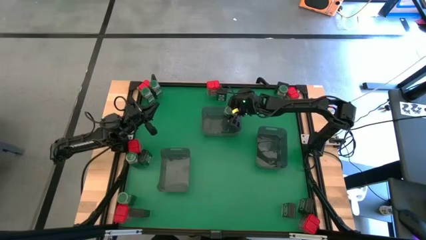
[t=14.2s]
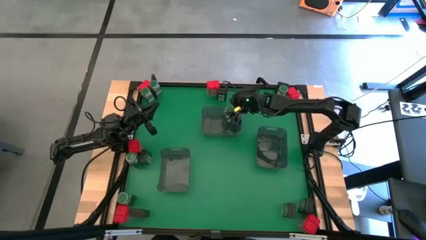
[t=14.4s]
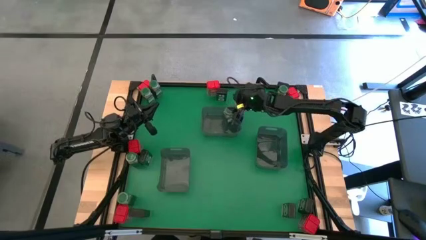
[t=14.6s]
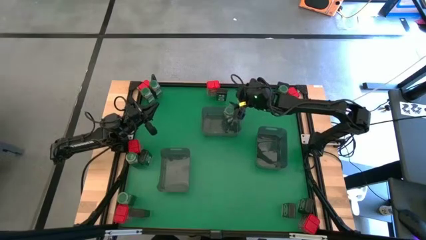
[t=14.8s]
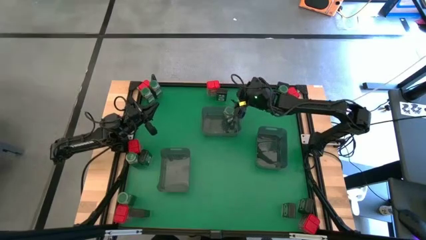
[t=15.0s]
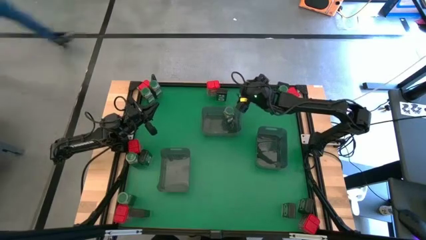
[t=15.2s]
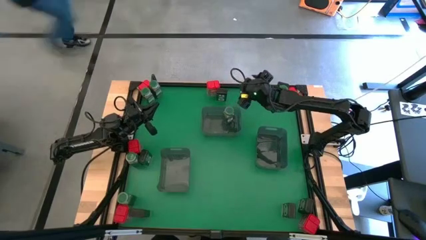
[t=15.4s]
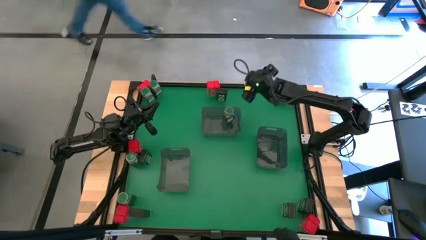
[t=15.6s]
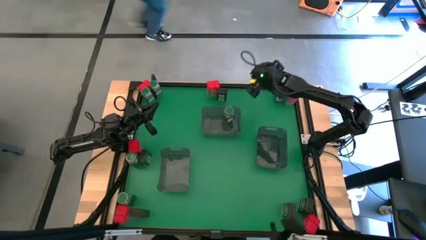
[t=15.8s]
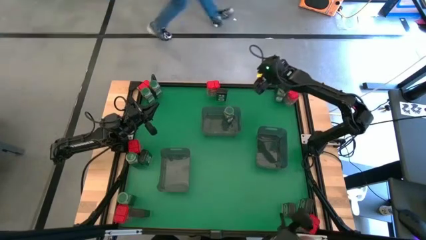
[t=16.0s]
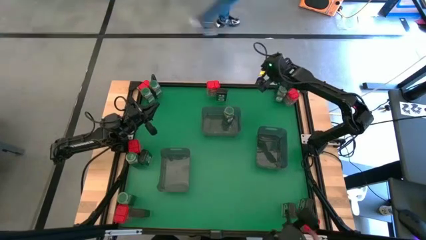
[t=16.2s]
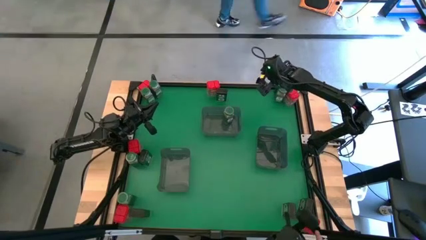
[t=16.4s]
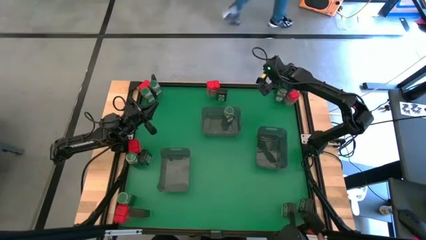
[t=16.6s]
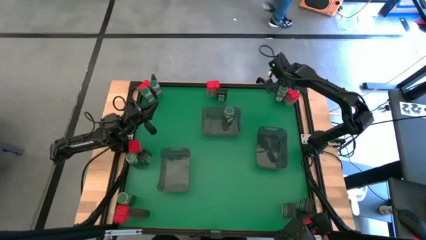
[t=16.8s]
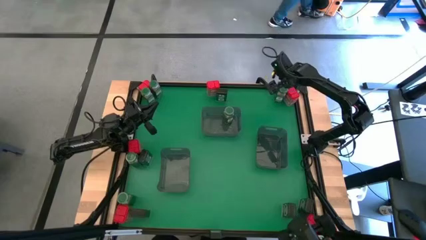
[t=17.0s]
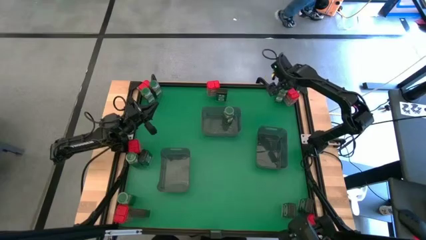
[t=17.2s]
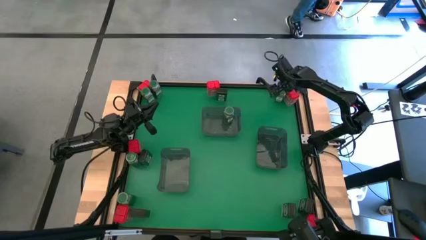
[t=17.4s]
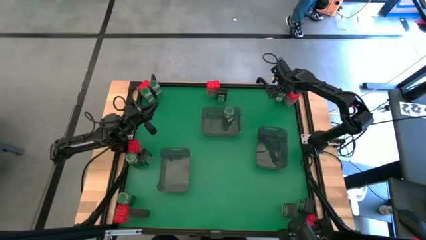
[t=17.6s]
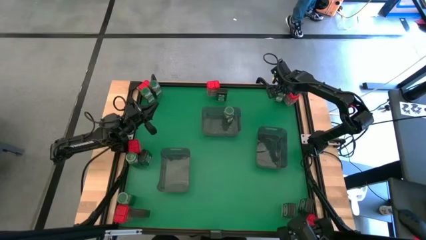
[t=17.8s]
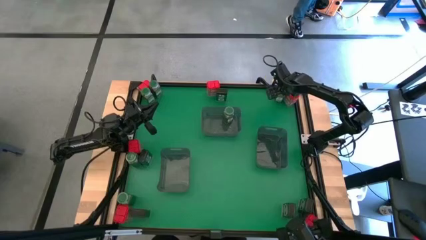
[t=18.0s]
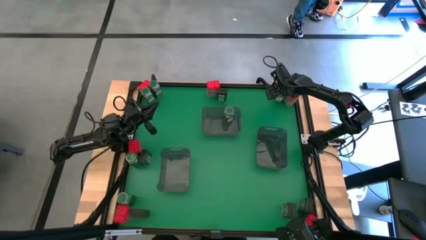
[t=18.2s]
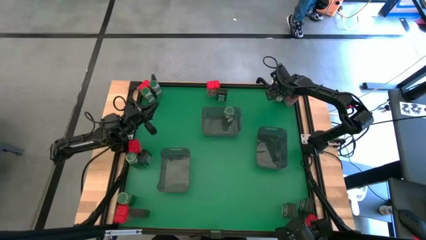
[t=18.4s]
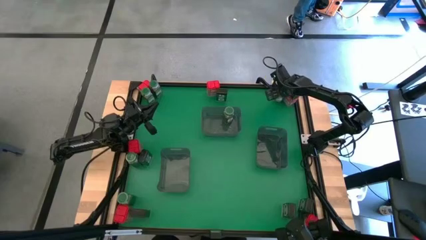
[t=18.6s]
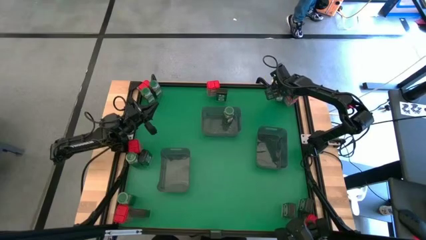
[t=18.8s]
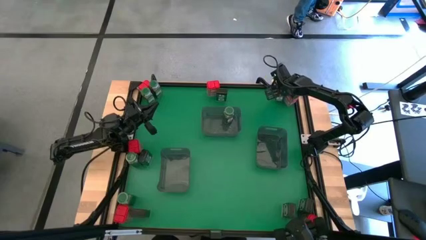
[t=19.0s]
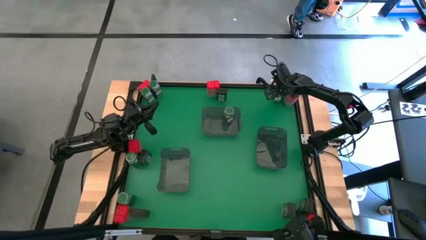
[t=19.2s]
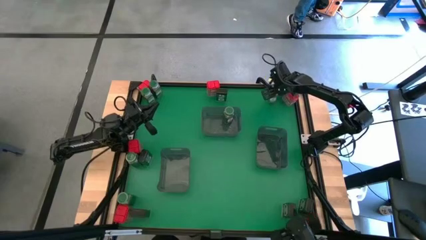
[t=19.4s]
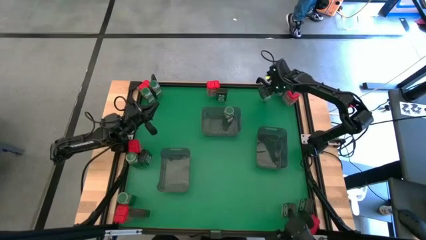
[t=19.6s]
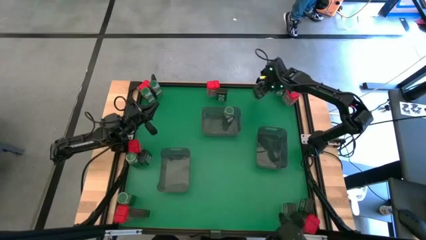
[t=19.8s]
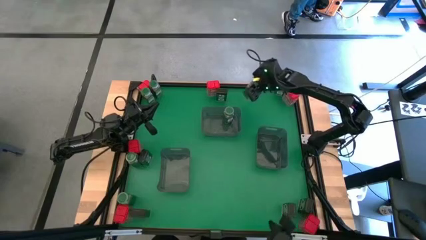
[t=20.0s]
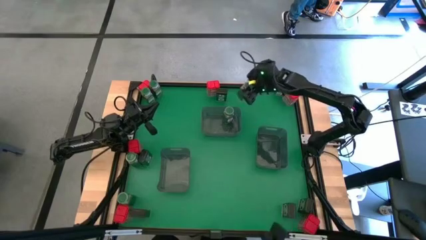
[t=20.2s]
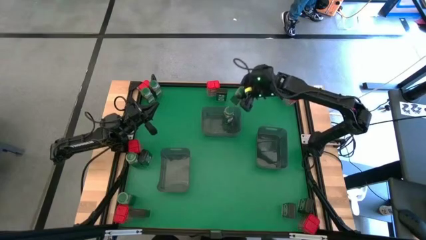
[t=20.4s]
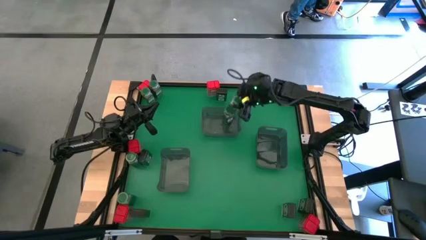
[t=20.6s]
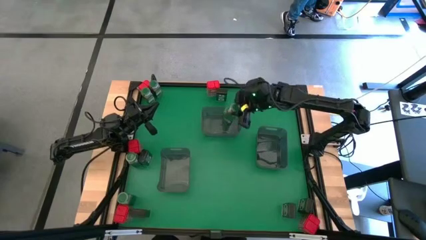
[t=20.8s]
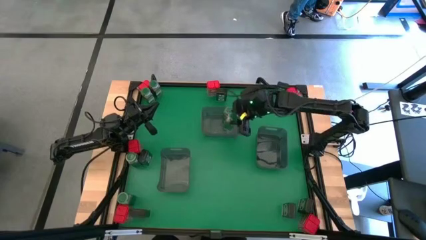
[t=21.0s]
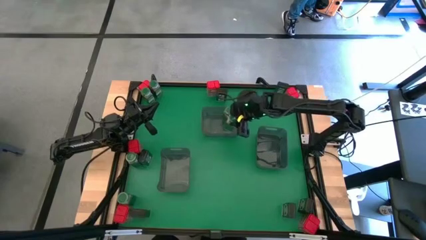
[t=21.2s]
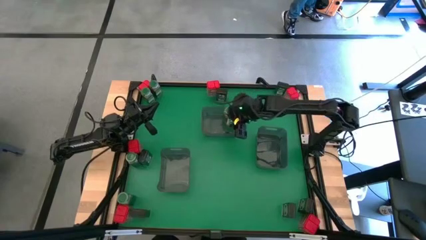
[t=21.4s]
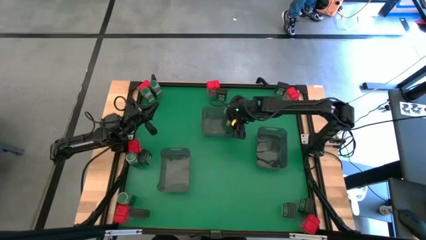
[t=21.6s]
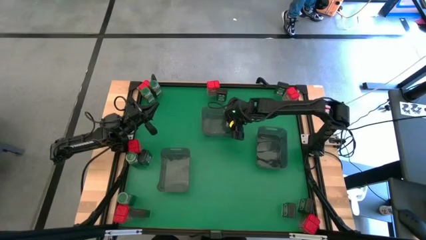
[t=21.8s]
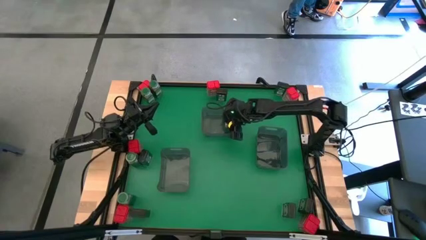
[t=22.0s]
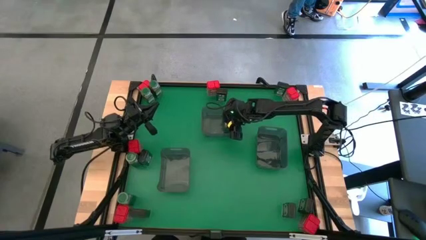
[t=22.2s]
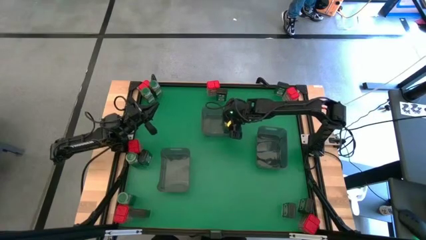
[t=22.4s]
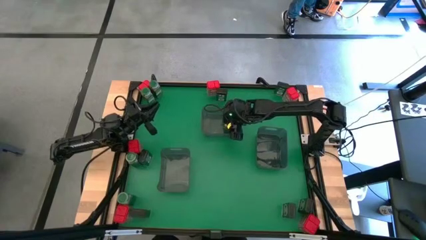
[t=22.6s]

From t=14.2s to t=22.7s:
Task: Sort spices by type
Put the green seasoning bottle into the top black bin

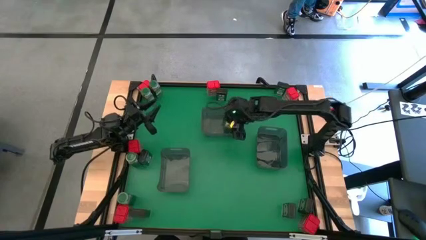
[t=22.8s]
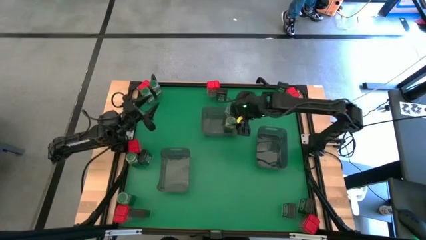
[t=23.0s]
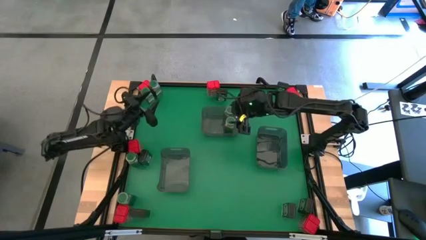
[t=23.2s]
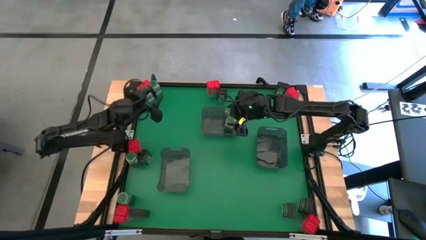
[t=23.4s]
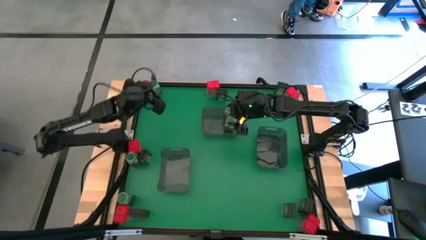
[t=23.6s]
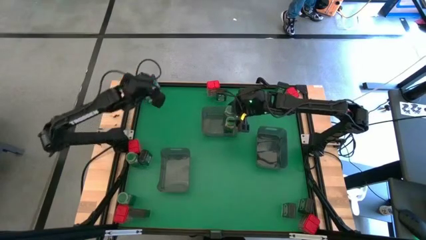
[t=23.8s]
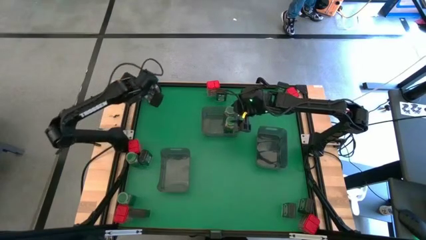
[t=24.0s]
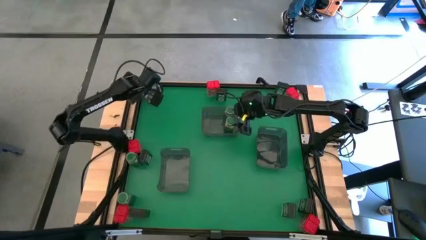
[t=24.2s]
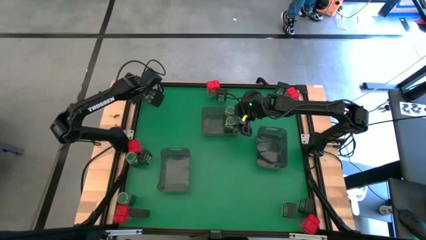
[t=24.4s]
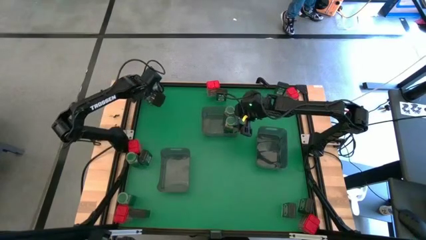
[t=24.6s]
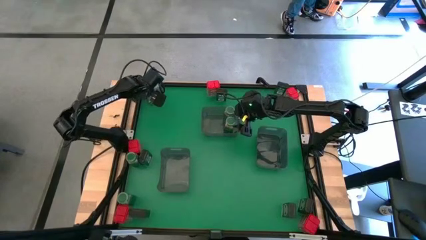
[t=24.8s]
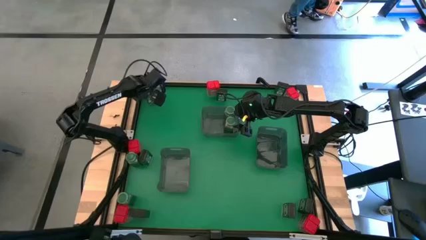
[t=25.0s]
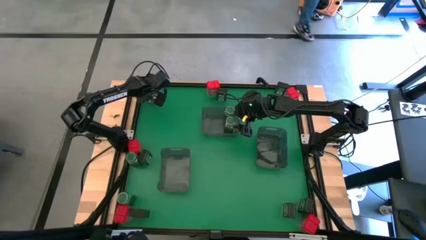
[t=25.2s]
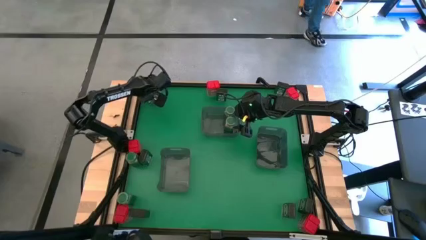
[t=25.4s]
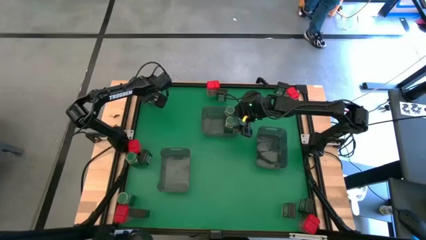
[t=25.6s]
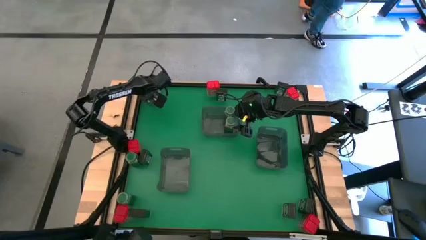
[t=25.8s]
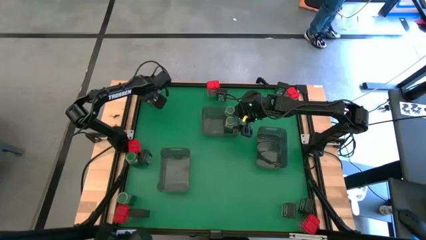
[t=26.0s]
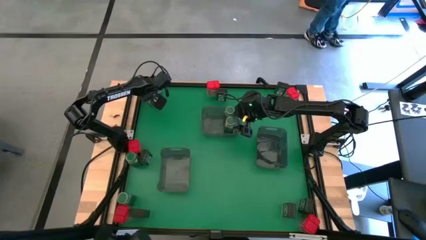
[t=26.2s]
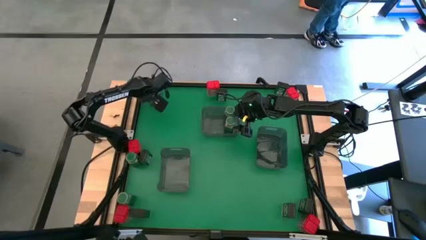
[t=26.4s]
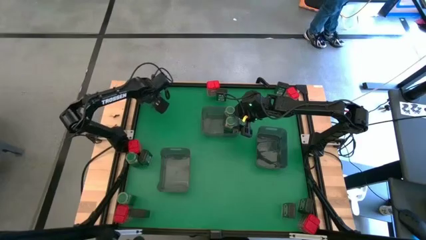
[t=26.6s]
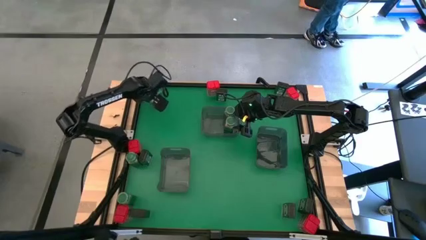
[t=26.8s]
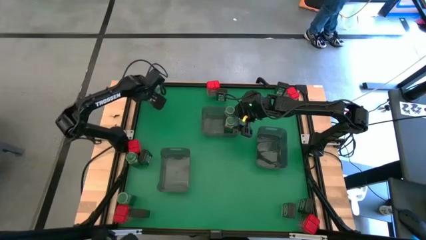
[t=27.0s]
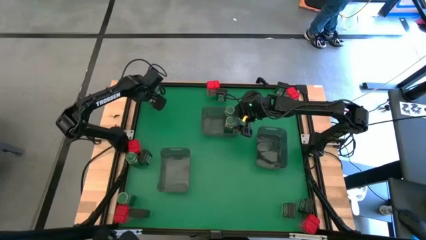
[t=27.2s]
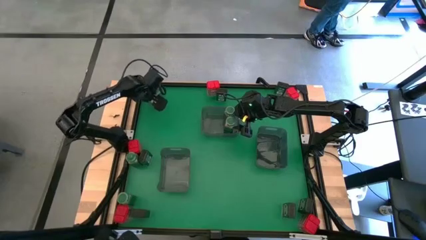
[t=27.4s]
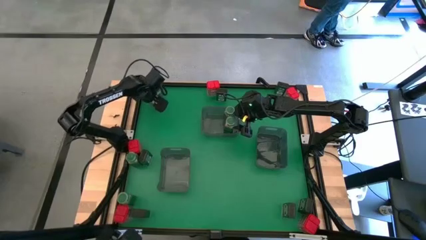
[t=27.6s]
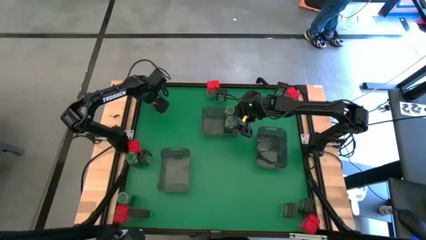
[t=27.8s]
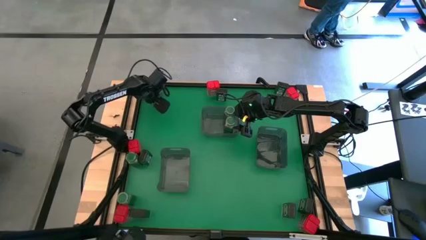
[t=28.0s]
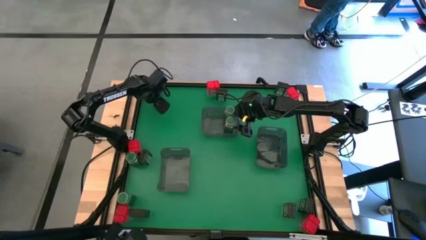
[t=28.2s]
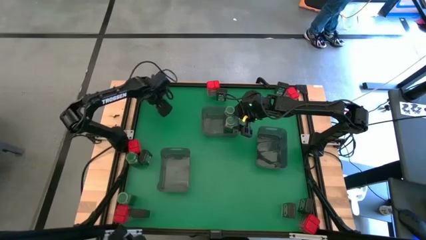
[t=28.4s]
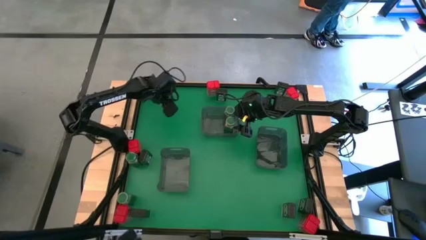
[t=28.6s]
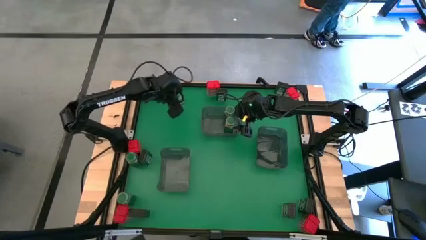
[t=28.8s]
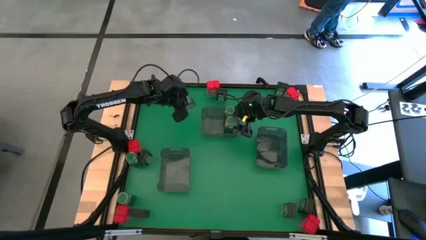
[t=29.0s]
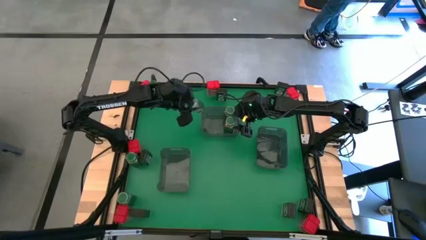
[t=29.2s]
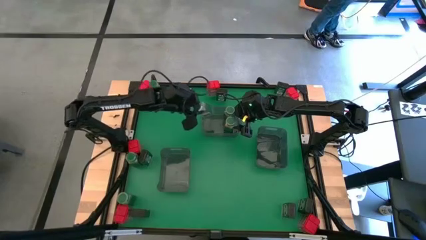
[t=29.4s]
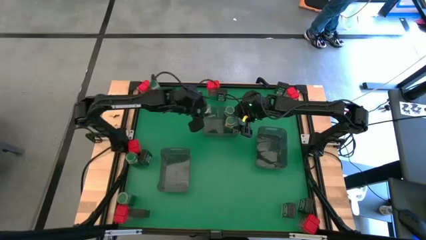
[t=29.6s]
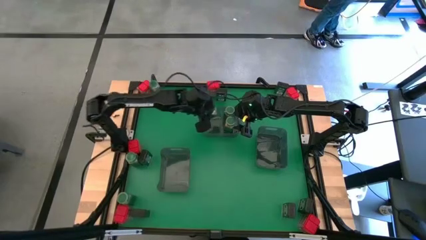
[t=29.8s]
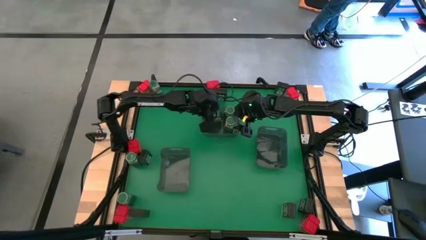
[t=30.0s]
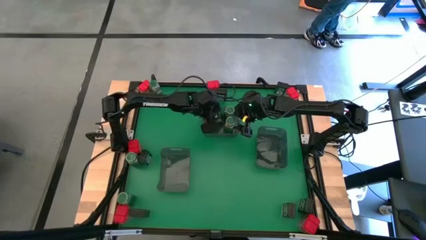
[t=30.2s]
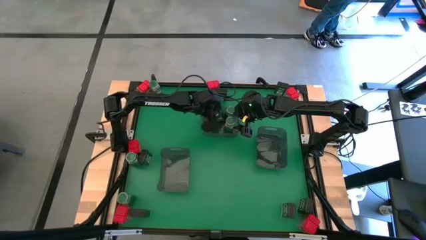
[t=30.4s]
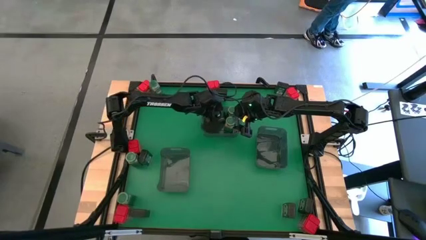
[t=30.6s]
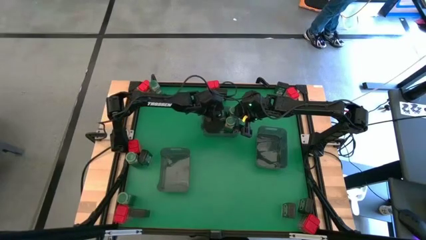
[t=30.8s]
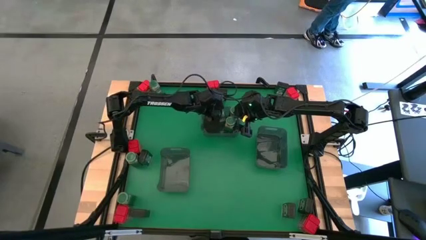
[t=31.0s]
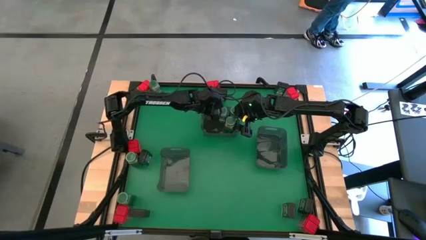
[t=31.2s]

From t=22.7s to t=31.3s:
Put the green seasoning bottle into the top black bin
